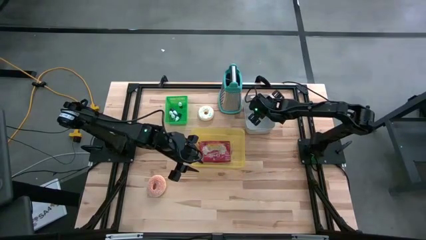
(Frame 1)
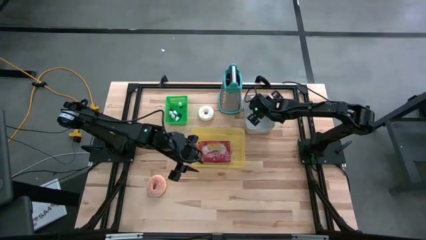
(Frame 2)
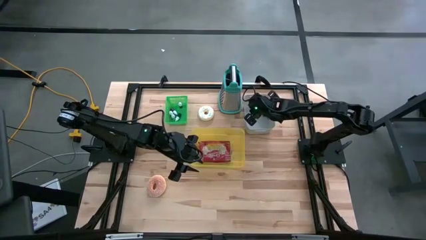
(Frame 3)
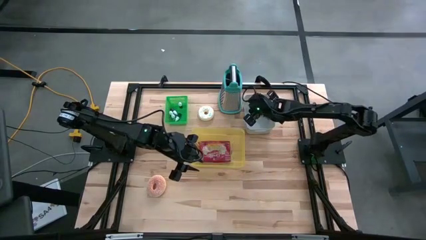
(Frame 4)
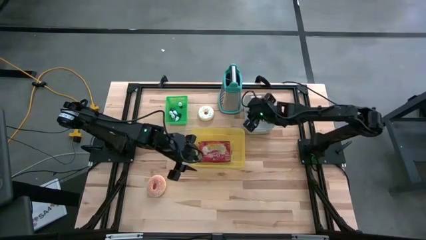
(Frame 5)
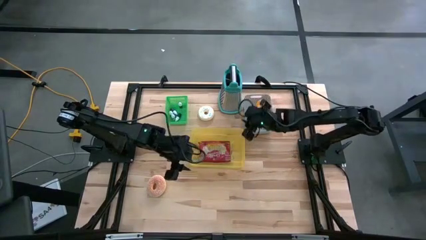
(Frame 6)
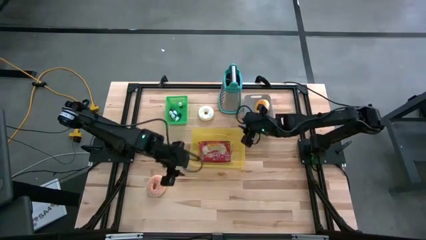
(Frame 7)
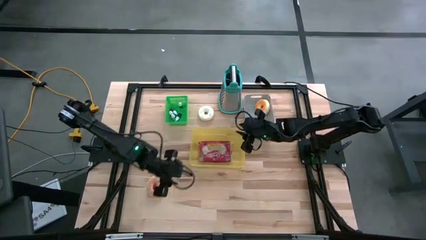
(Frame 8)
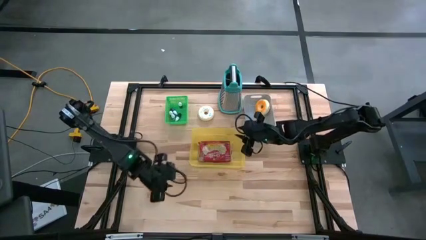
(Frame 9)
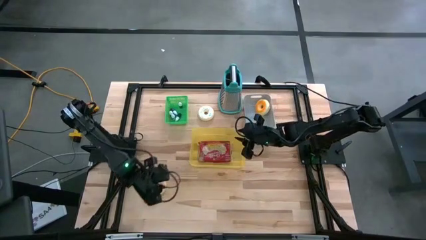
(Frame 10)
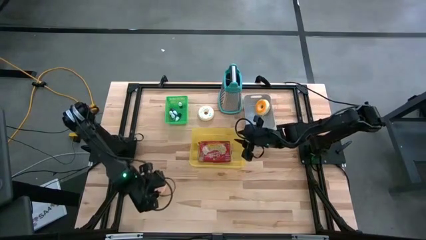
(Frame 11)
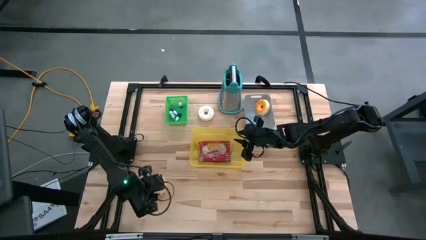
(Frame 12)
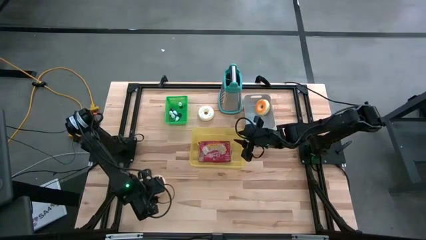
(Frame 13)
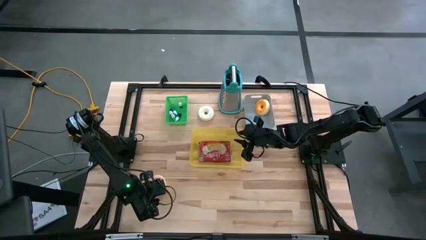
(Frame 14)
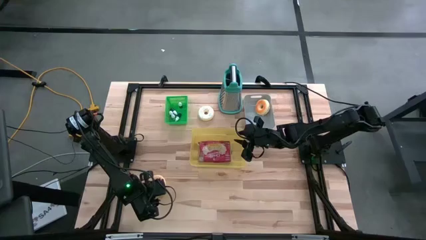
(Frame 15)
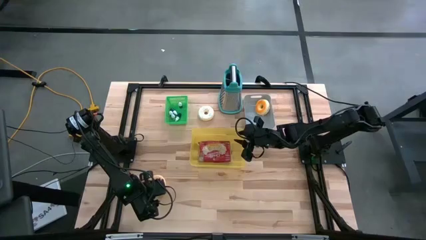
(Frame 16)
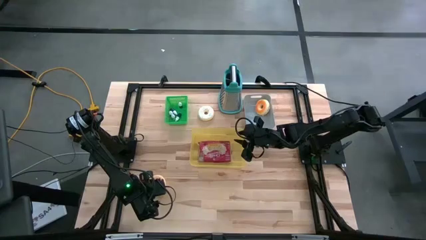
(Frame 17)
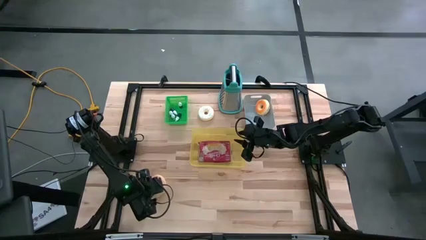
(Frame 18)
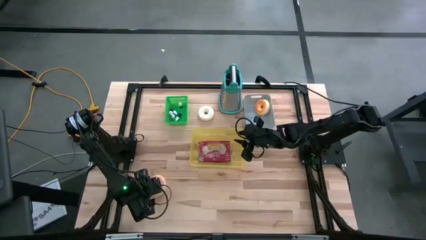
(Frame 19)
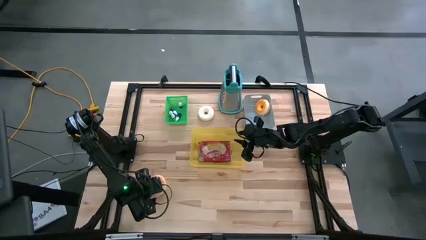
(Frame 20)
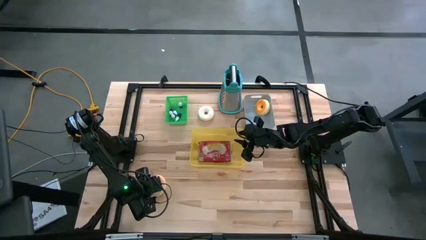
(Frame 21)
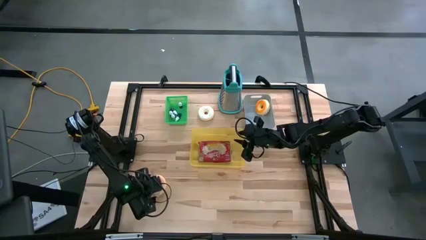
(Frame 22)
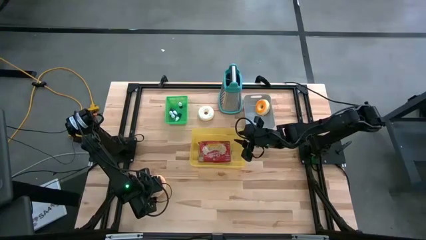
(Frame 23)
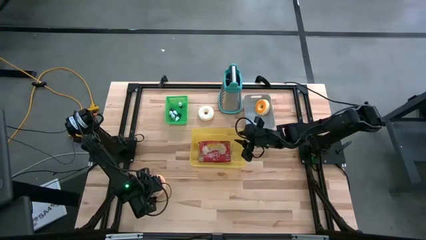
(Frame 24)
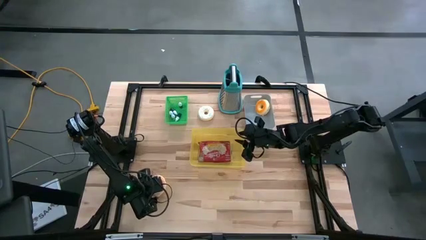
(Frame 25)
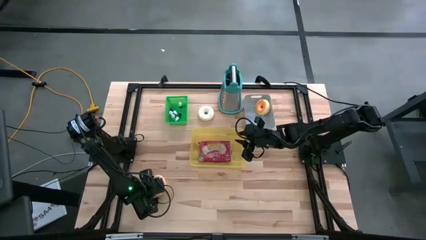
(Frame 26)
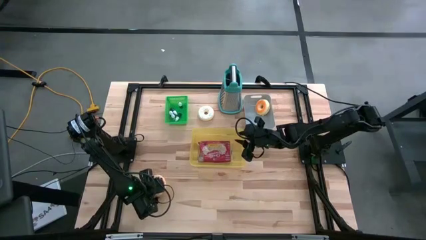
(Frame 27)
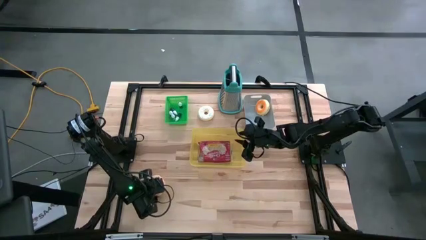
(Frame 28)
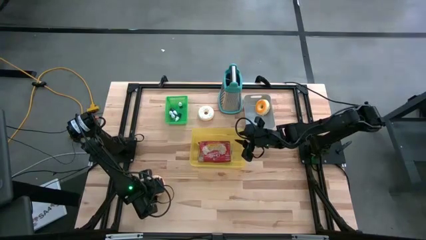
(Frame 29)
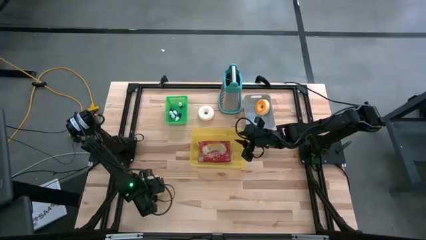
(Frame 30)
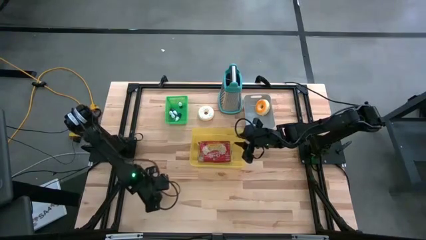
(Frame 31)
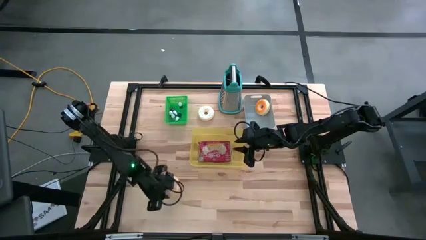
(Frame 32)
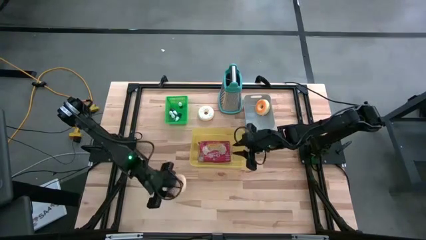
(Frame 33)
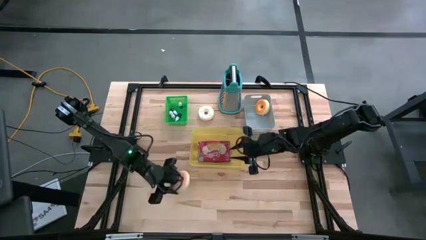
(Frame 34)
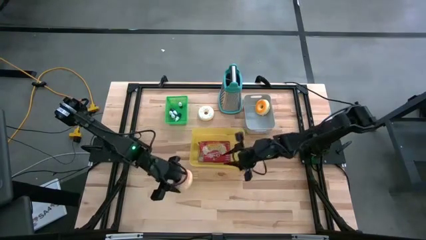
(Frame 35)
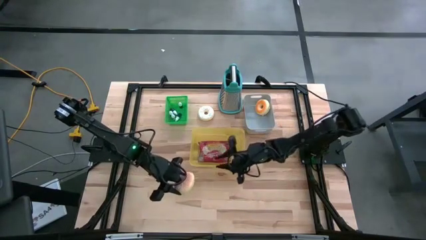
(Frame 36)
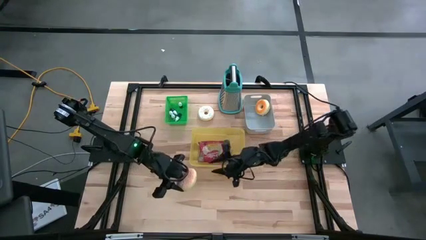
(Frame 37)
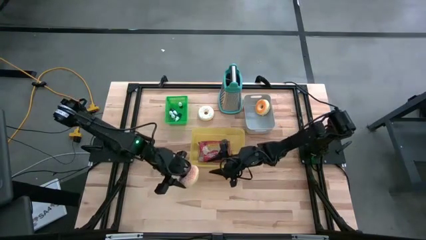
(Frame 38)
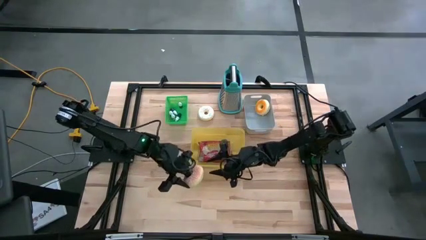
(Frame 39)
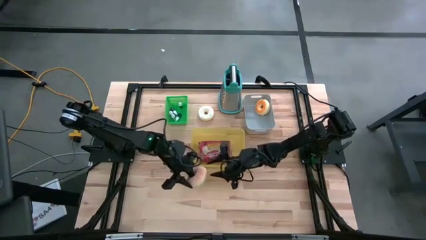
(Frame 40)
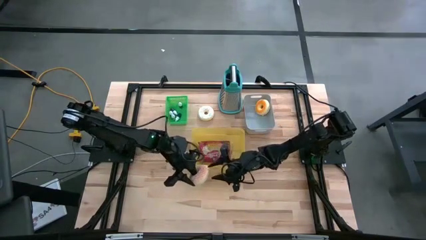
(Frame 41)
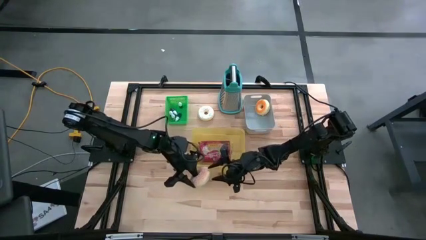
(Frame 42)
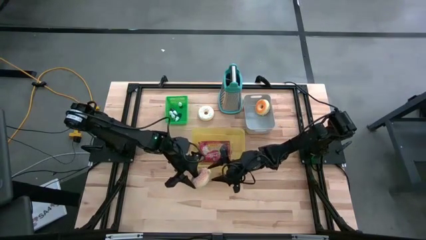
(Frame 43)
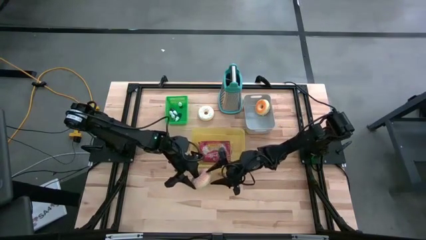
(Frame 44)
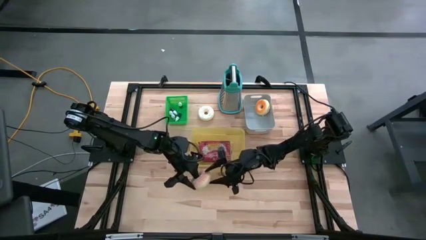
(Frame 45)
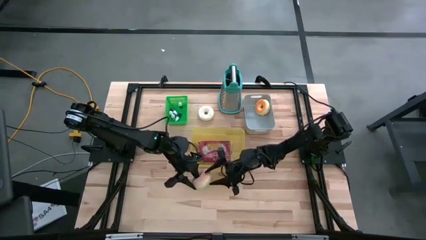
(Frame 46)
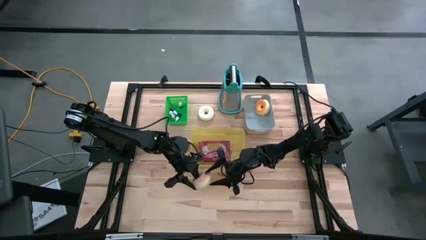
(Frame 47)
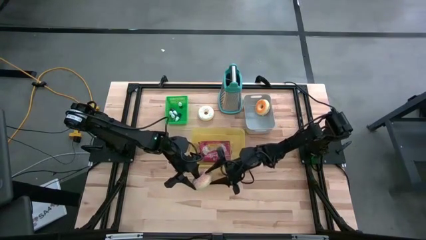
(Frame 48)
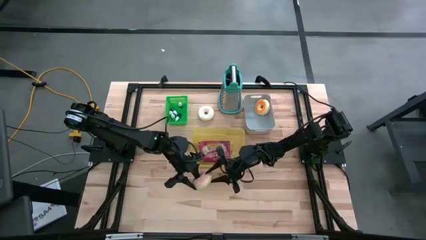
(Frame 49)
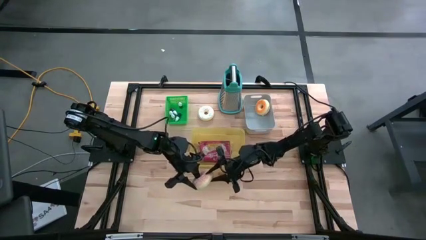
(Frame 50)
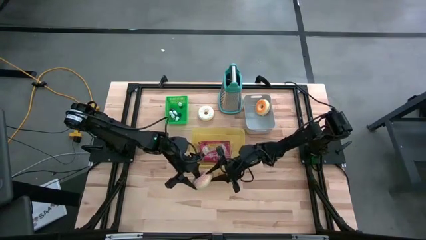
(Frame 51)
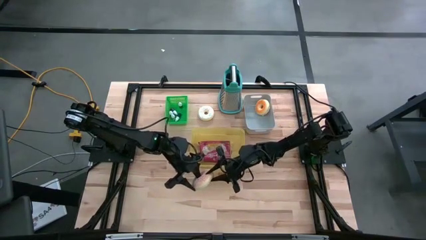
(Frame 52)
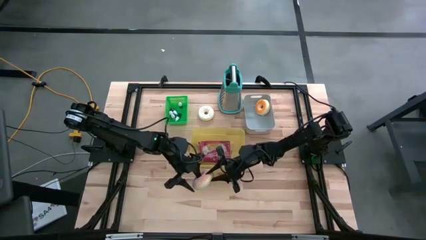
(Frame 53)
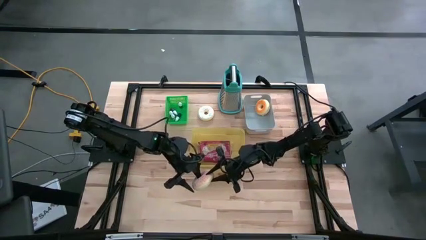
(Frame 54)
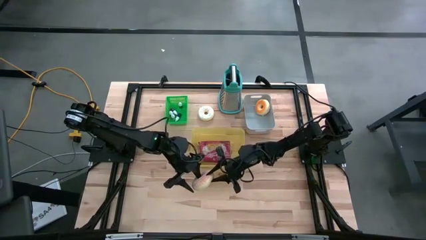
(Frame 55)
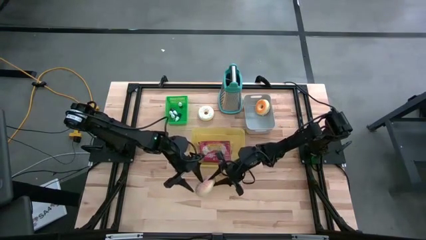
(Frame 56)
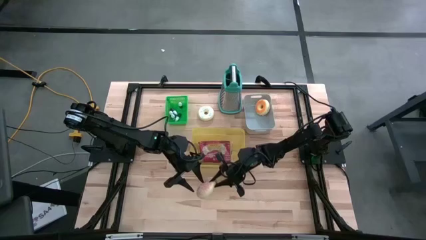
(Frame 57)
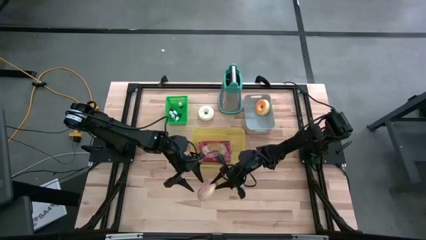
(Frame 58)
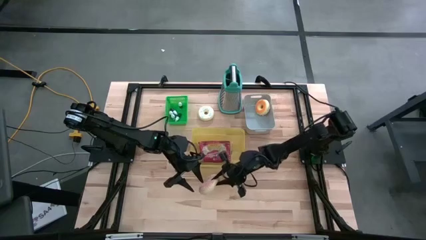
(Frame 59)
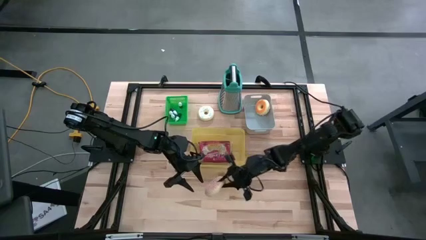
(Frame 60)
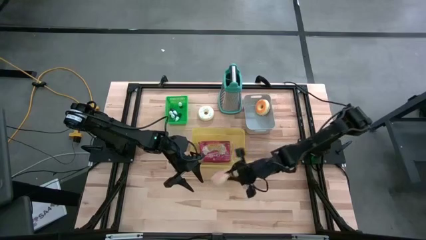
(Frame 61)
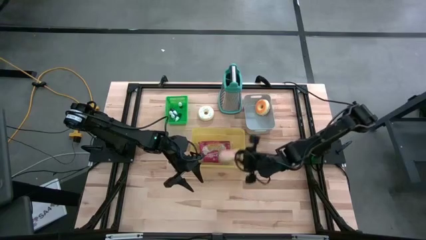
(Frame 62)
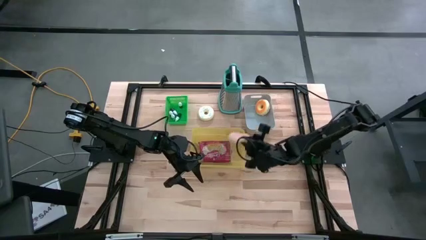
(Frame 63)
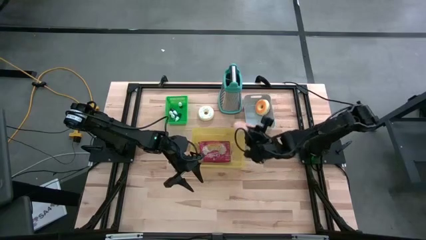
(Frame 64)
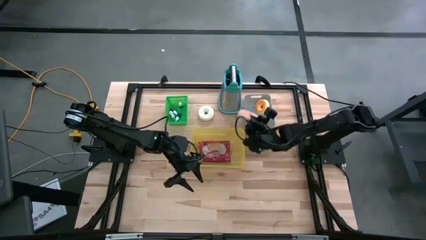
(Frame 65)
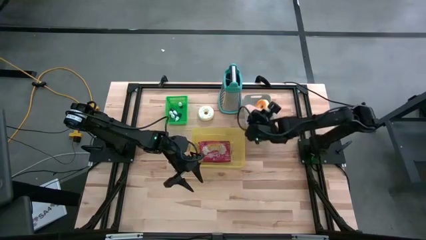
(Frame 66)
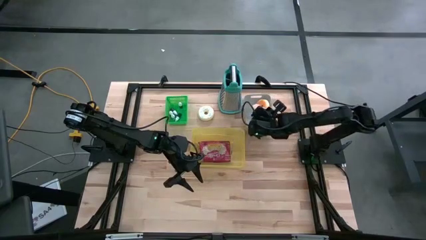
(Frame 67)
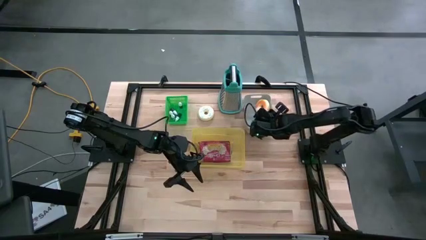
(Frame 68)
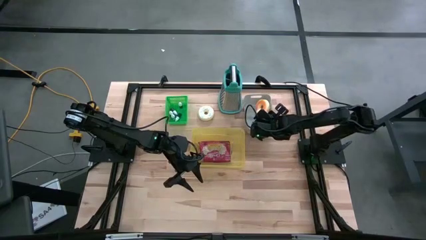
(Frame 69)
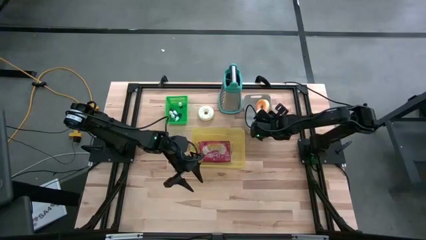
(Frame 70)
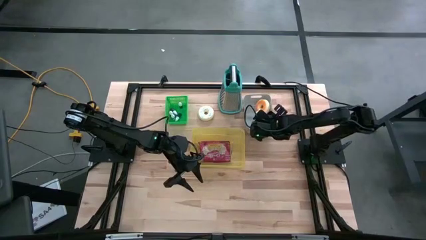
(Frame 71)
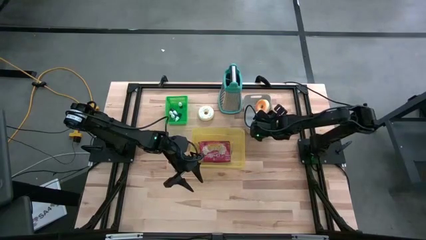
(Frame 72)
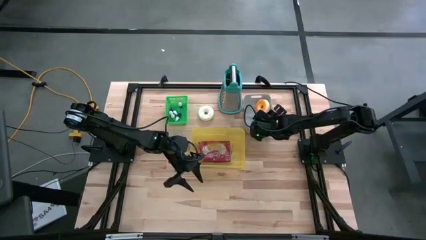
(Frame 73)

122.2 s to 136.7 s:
Put the orange donut into the gray bin
